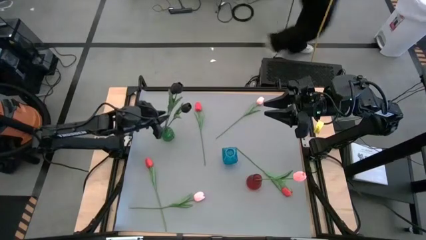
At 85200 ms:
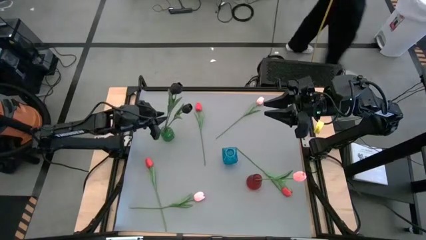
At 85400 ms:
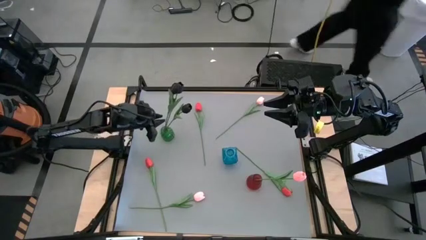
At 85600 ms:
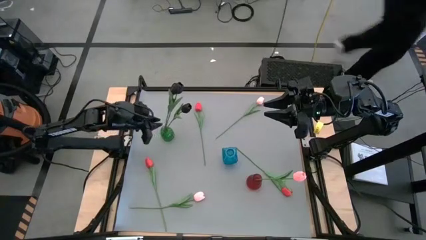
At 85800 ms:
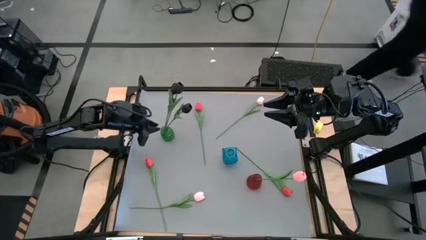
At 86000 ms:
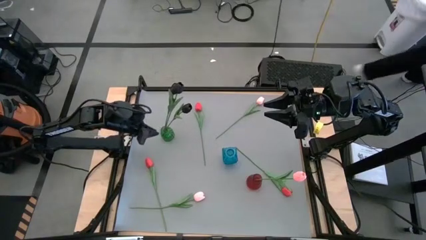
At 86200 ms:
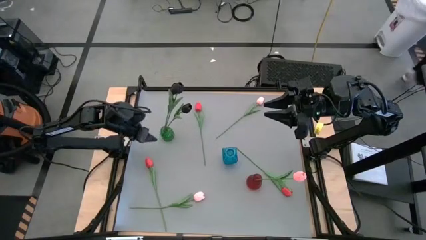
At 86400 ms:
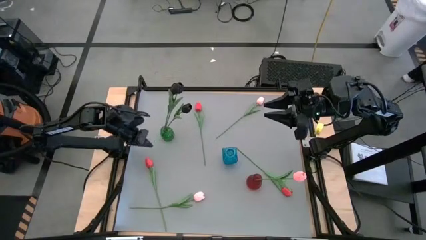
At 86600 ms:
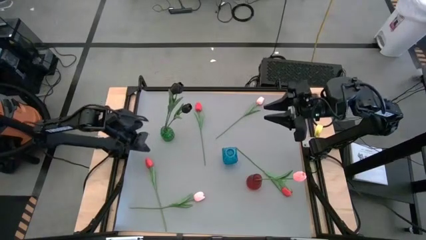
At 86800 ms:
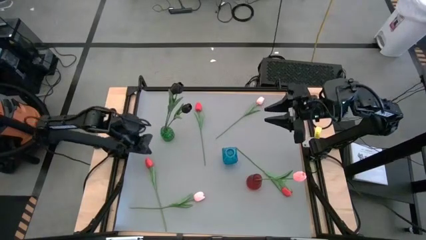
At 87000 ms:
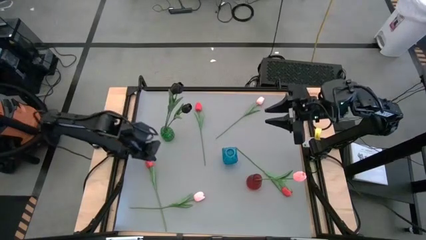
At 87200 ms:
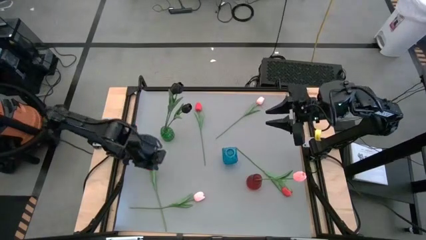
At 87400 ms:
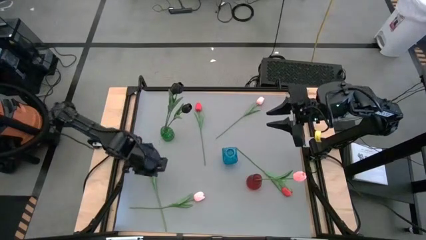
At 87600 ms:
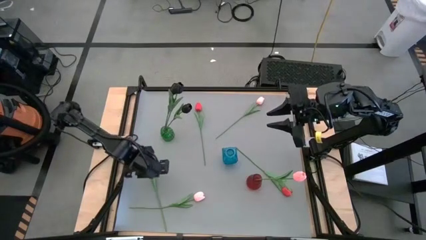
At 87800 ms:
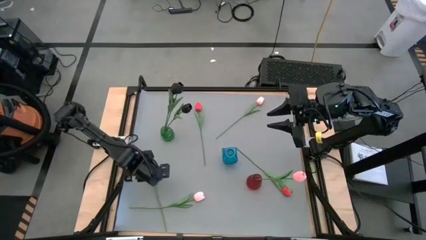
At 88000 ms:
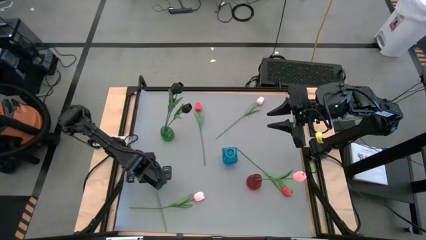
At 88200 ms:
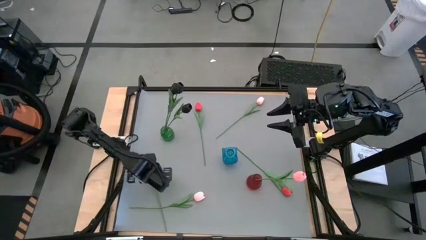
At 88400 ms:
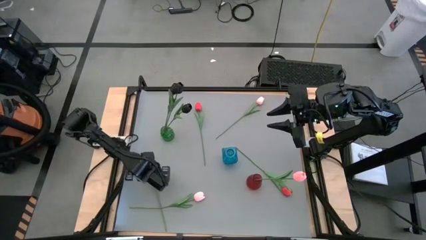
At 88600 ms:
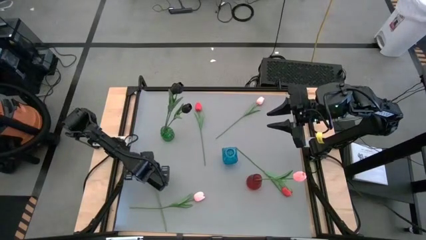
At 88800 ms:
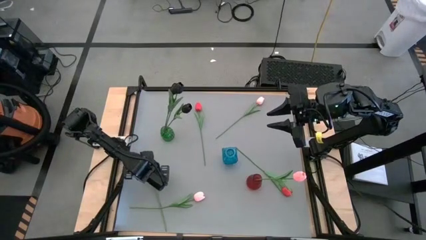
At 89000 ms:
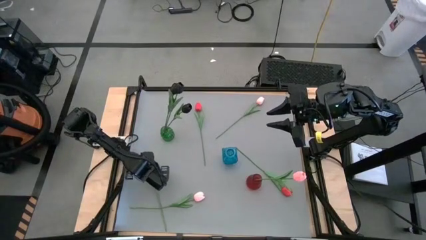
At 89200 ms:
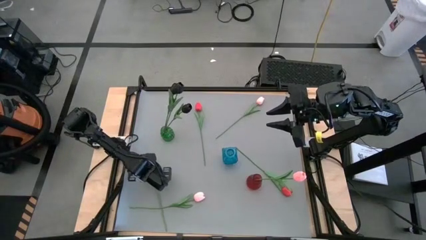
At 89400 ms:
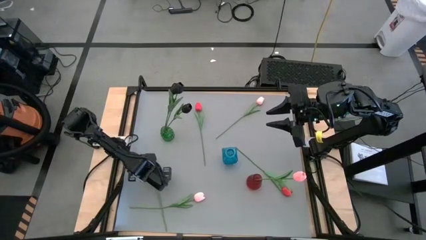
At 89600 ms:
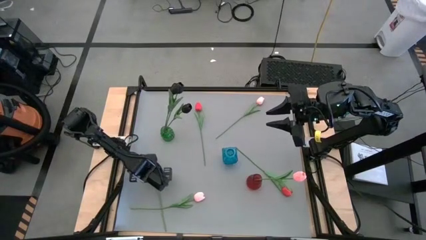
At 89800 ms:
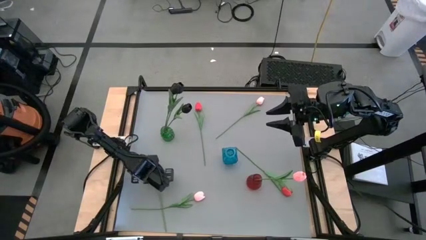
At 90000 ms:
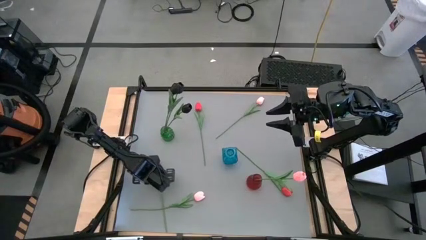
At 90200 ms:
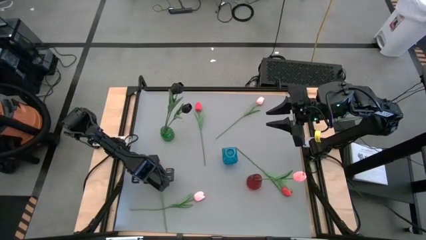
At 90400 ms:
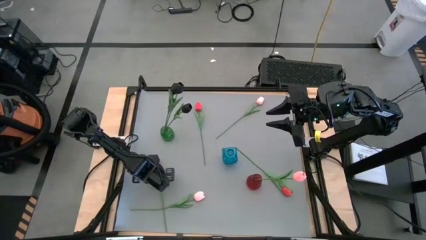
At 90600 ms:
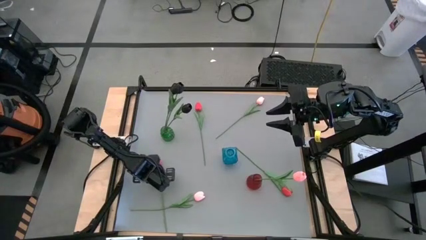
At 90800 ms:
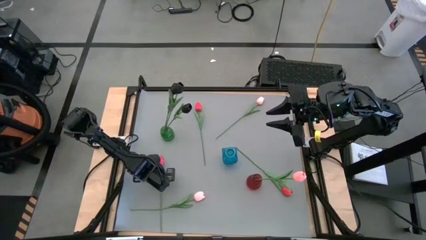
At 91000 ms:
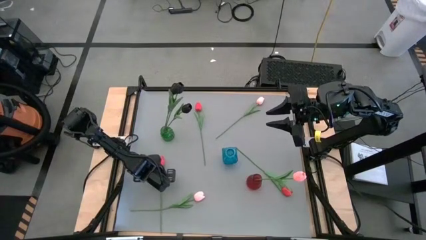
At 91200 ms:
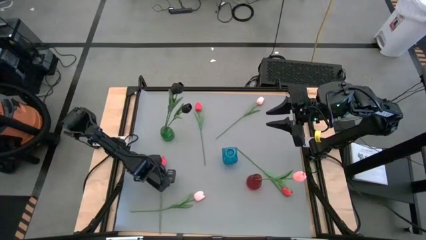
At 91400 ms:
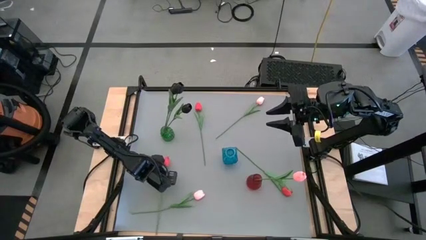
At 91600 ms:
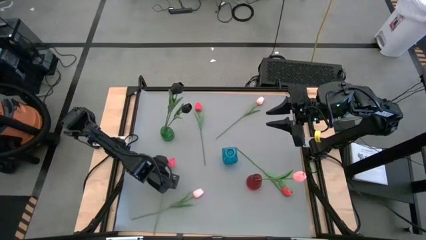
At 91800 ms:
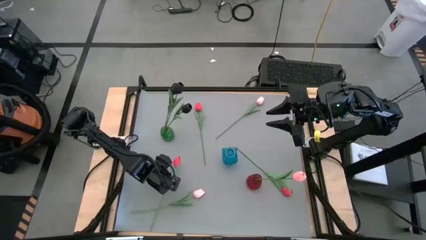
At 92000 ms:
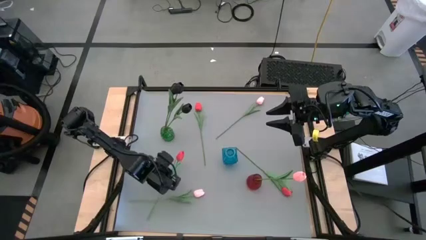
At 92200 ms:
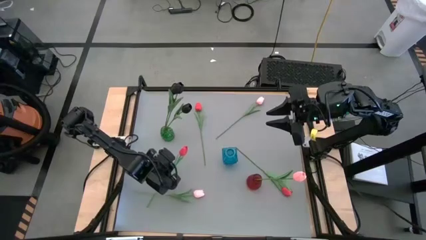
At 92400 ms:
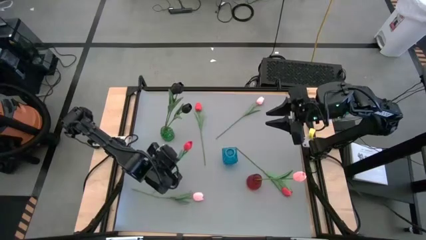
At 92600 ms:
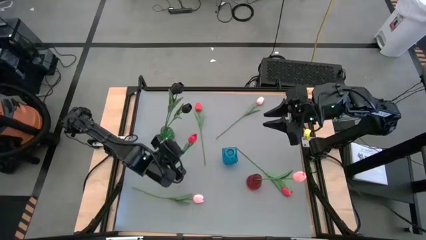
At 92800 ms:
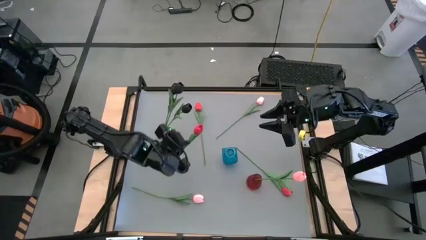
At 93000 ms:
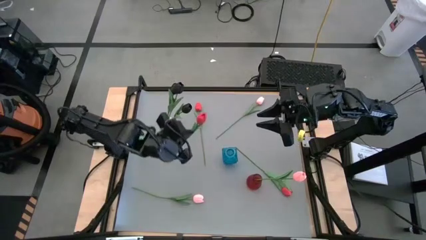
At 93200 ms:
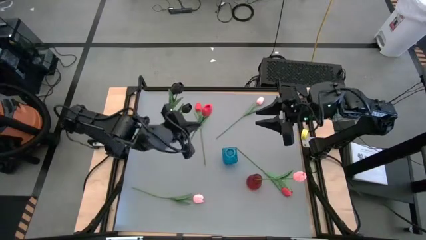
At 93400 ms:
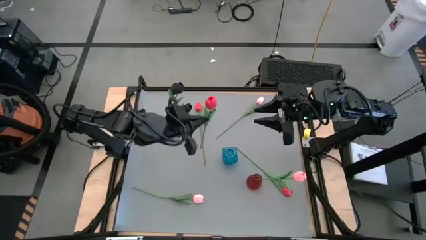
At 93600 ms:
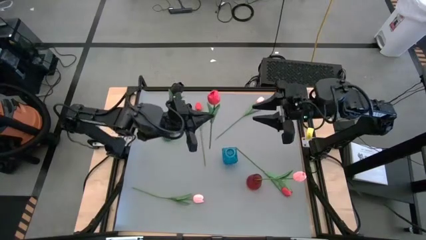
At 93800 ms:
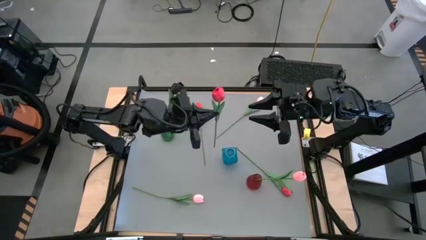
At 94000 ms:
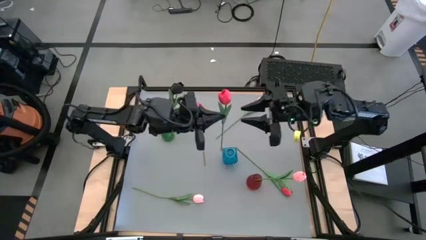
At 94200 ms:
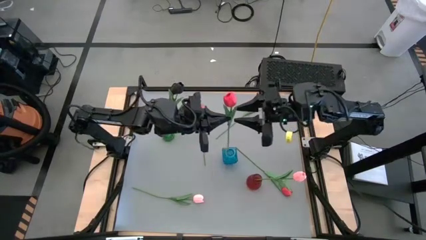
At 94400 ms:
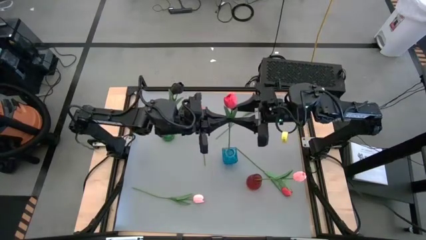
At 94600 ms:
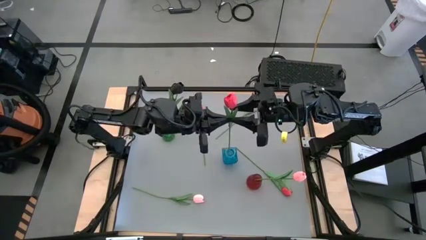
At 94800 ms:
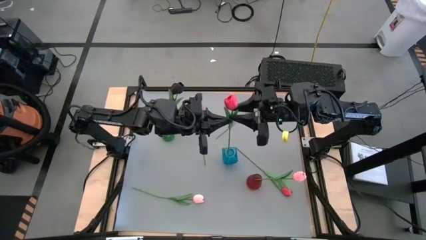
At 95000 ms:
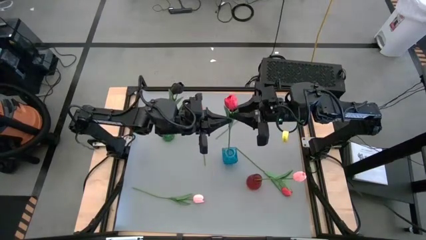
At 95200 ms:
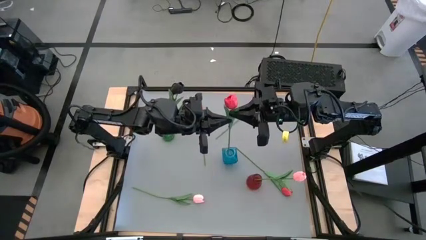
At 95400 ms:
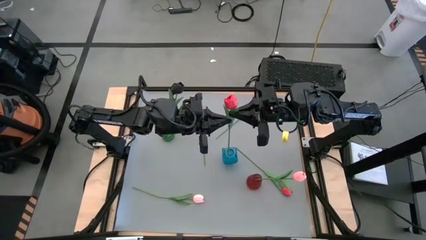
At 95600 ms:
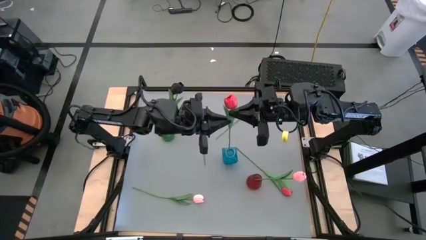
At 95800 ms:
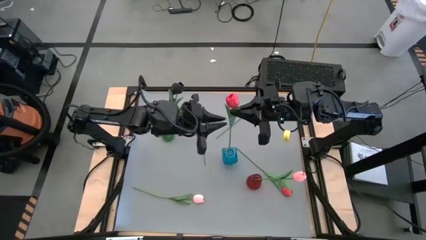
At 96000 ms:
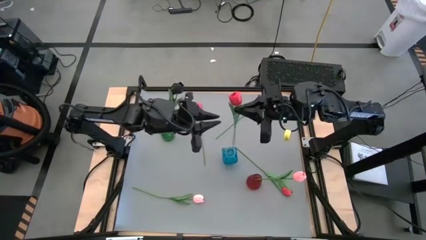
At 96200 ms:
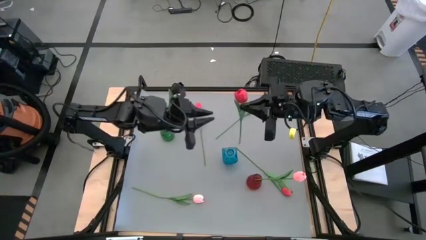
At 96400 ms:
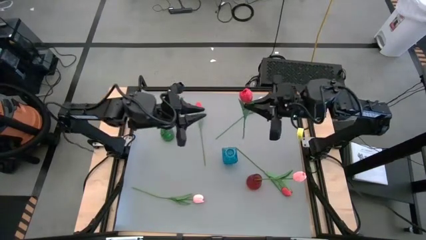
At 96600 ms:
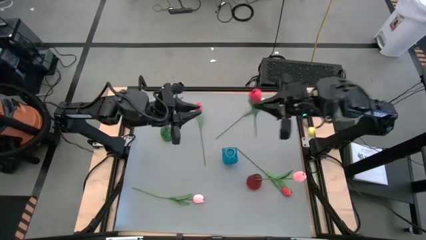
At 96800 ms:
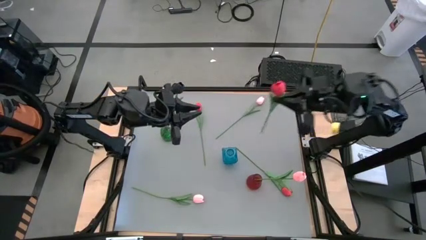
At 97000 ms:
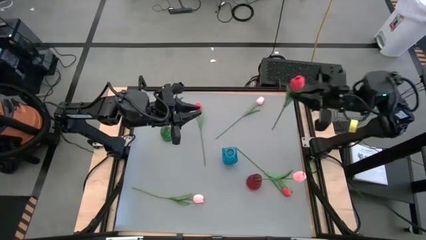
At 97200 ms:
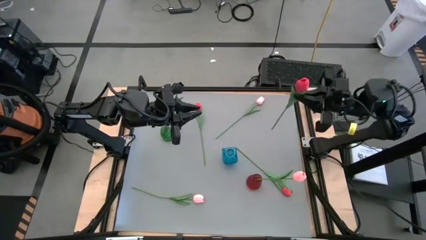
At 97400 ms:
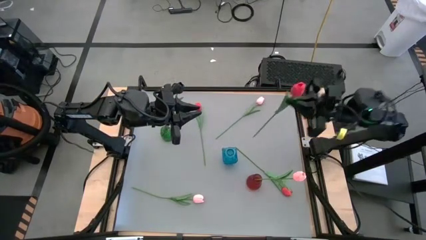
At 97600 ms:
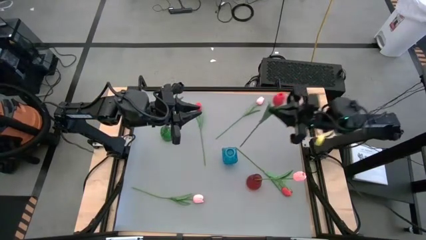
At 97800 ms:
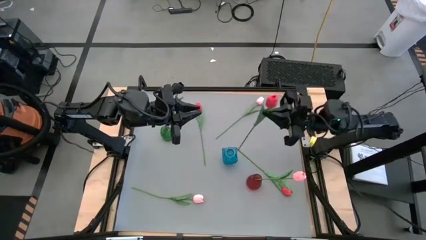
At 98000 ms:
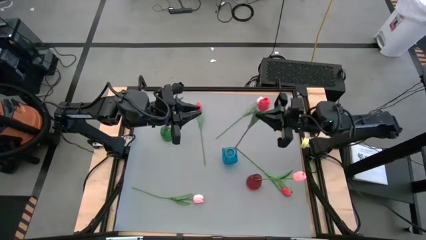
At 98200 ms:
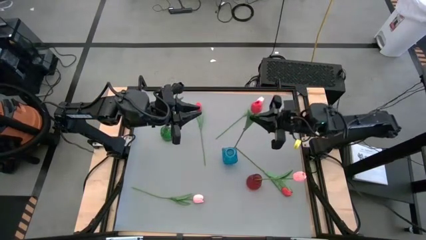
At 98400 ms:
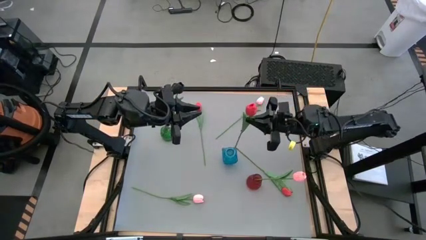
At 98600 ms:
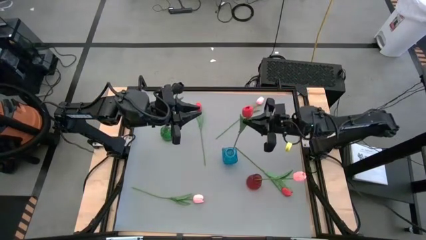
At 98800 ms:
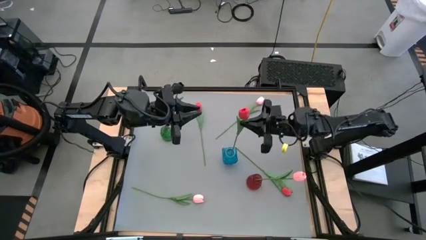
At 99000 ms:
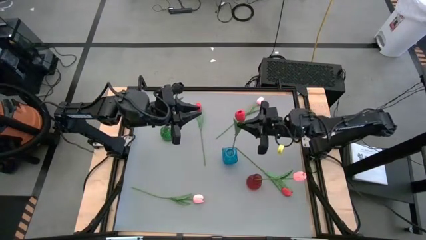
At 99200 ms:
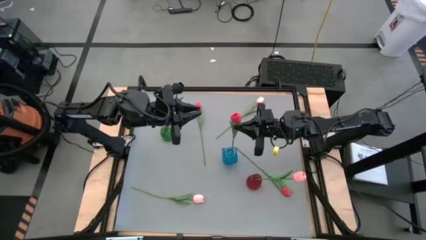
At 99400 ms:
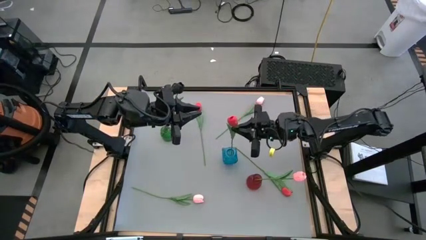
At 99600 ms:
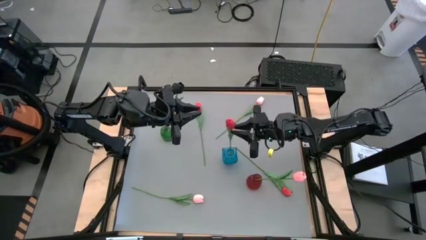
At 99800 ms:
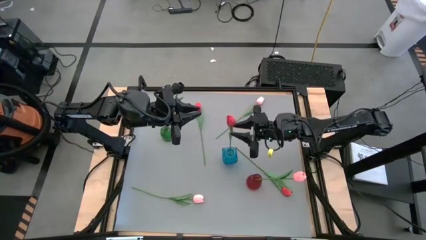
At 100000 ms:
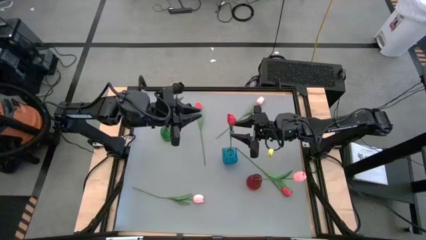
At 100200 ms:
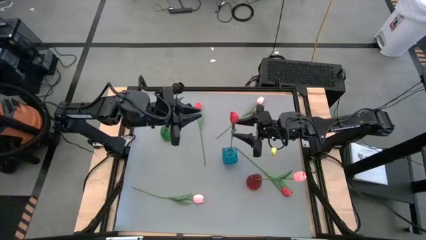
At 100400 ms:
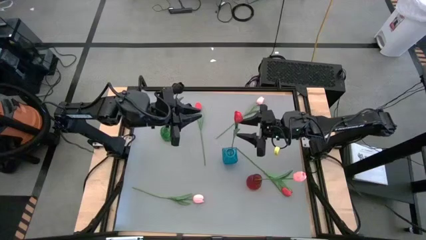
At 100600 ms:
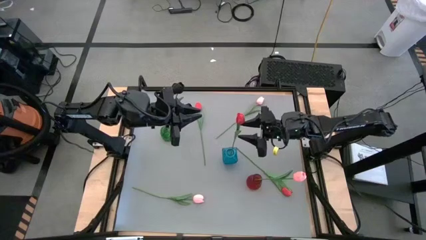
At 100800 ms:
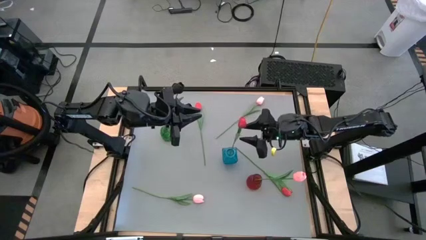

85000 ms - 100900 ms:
Task: Sort flowers into vase by color
Put the left red tulip into the blue vase
